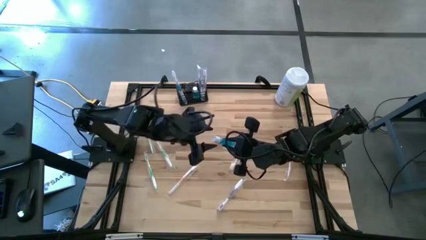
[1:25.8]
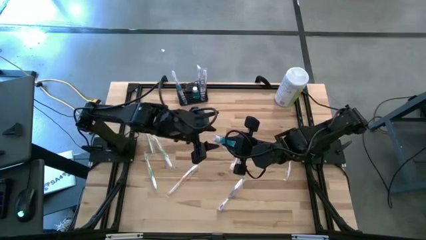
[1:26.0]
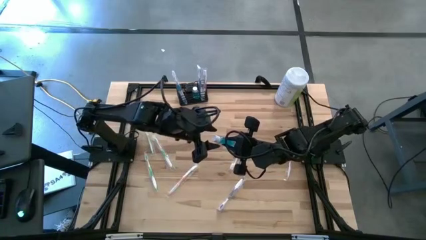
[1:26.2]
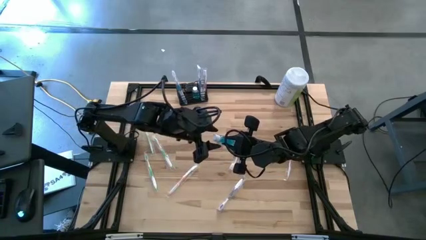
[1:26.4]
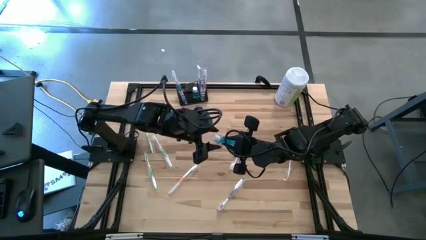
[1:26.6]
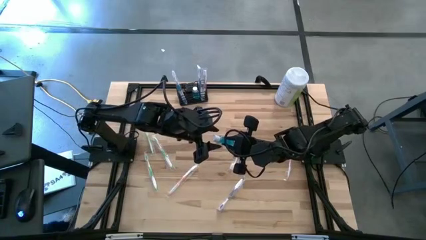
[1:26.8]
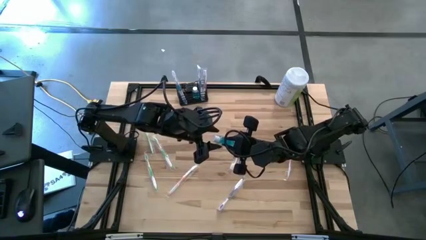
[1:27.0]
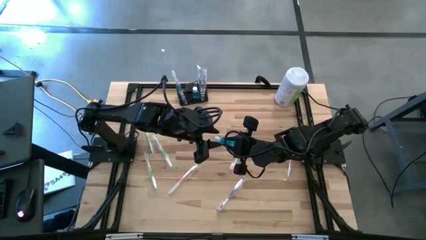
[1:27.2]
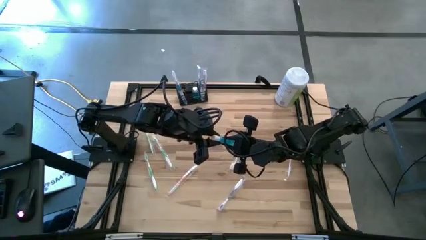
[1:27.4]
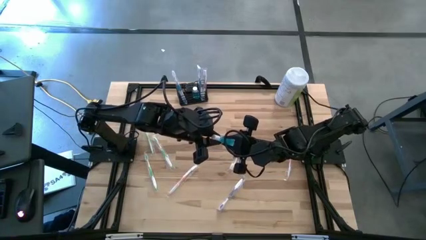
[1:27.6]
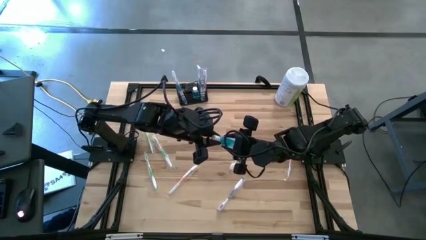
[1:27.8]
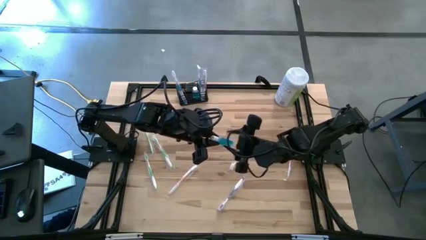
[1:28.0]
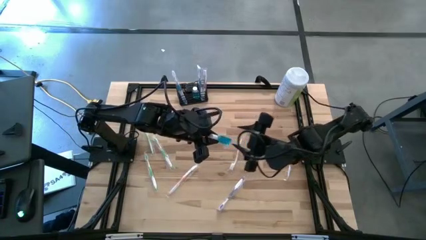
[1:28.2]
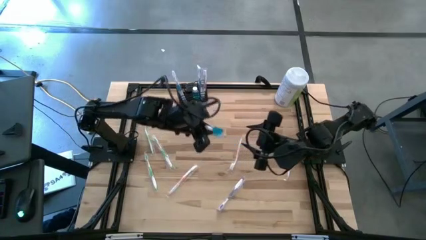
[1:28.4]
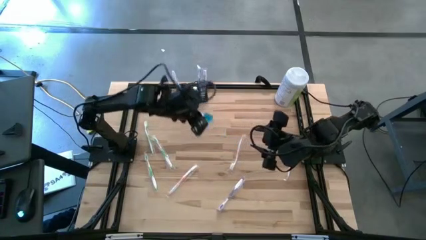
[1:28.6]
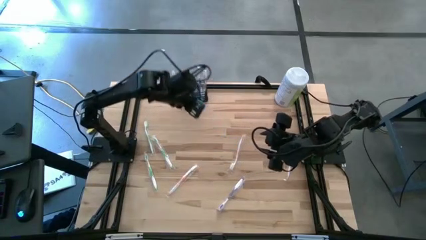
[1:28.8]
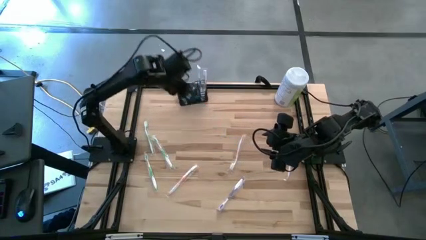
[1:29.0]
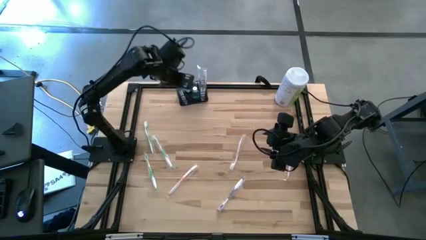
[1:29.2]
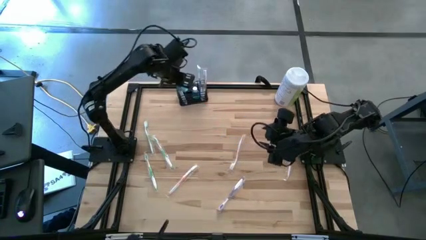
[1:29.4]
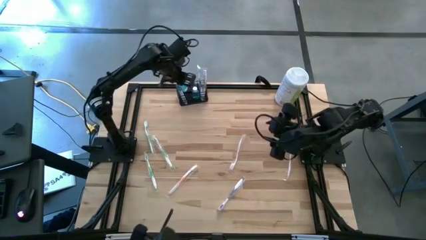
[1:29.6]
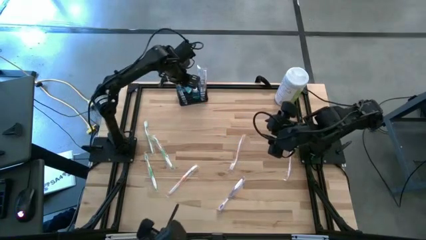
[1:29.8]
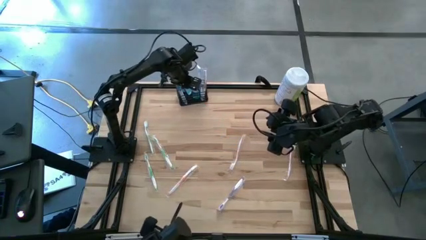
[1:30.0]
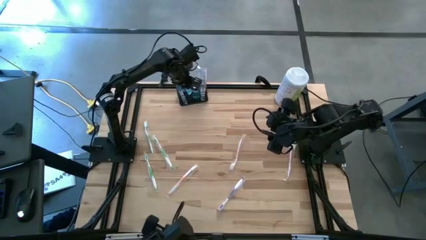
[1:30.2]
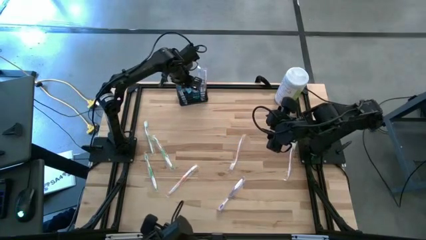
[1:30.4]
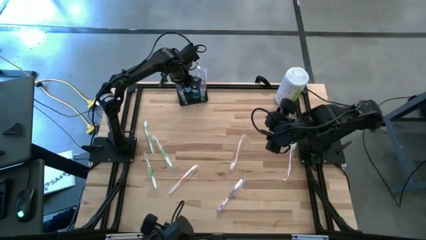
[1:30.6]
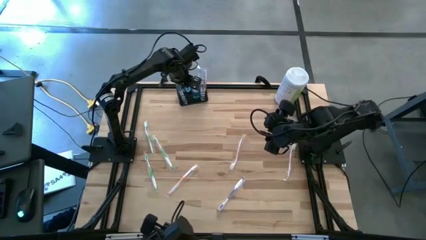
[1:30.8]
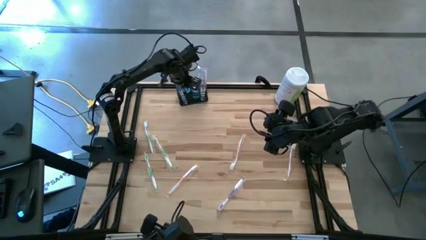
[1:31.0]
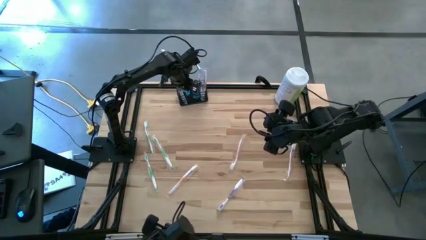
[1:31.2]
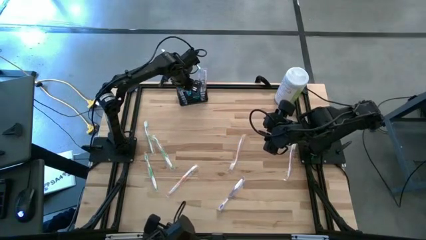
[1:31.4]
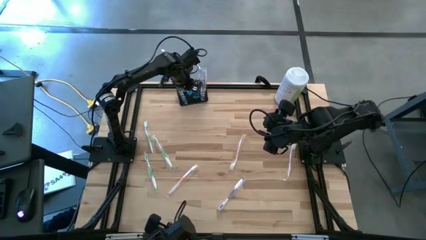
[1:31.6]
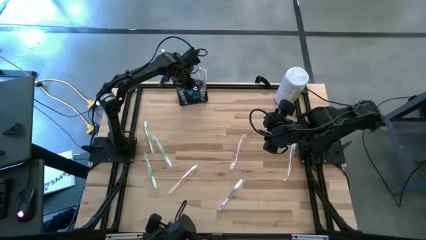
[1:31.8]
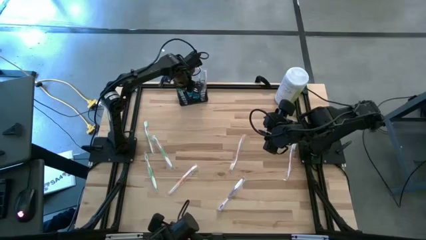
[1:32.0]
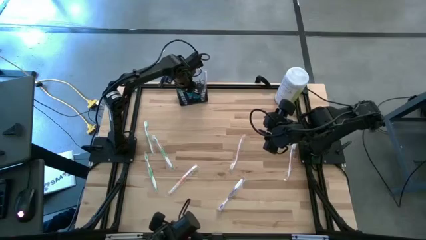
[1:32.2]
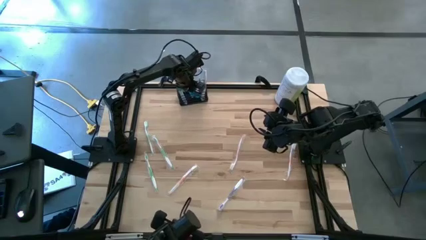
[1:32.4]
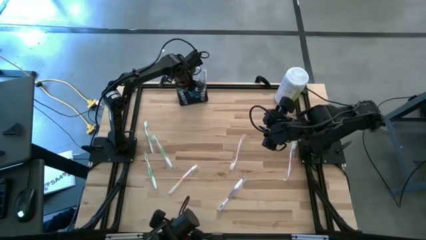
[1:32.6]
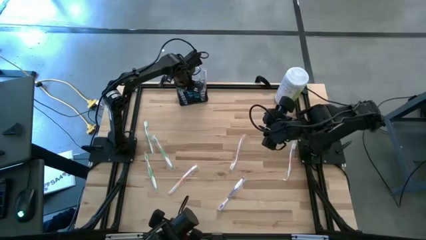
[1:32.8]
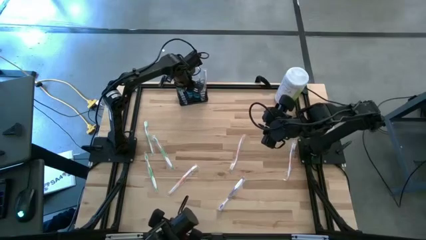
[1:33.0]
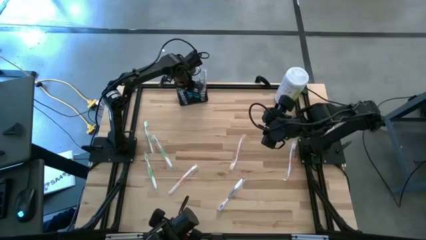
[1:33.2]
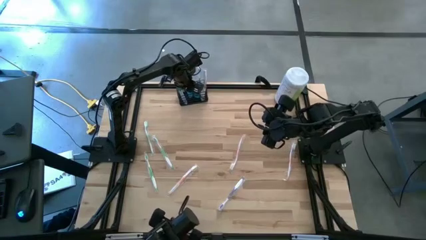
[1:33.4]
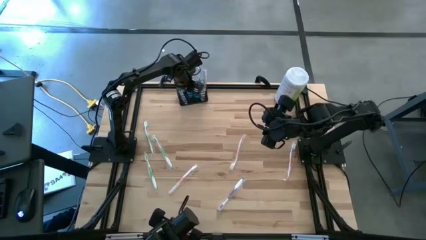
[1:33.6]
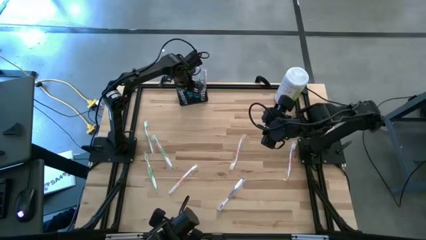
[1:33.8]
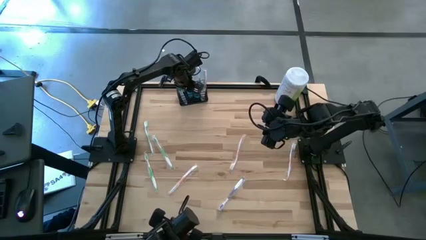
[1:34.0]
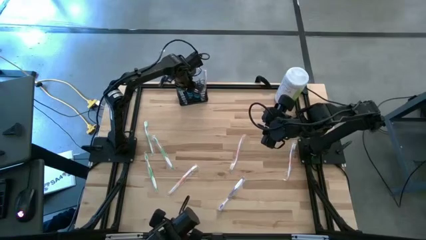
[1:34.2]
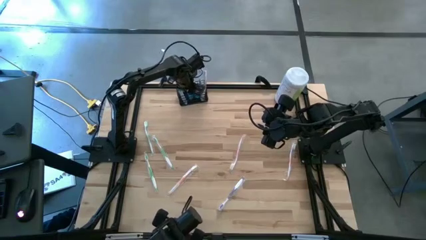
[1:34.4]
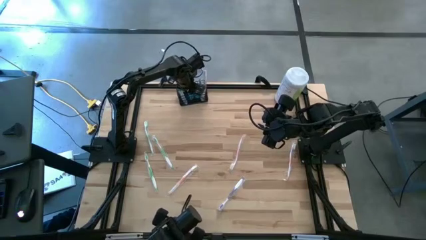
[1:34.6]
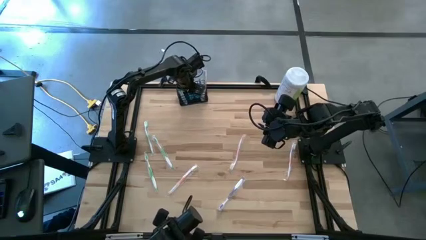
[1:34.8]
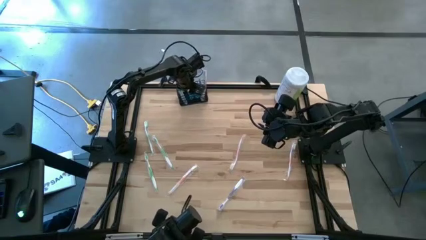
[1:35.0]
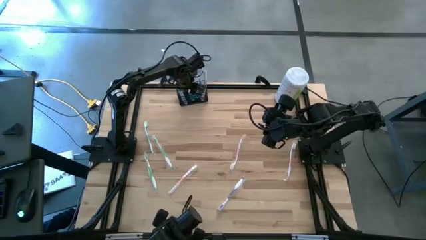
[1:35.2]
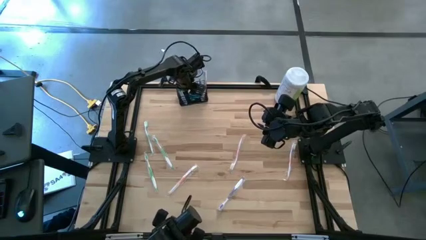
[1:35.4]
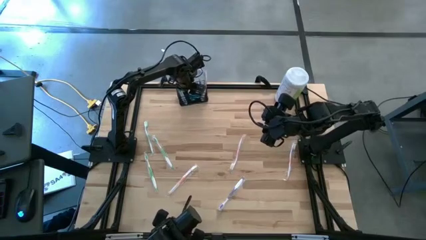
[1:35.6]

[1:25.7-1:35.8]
Task: Pick & Place toothbrushing station
Put the blue mouthwash into the black wire organizer

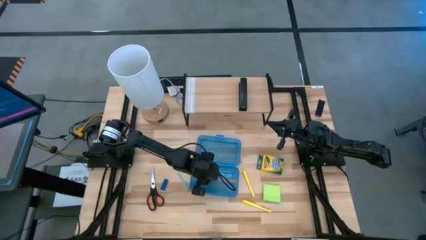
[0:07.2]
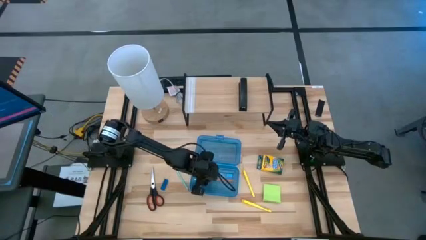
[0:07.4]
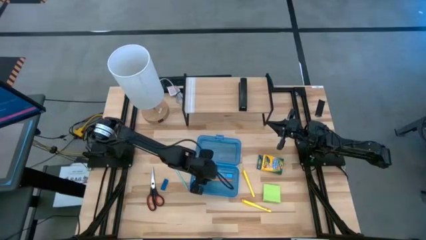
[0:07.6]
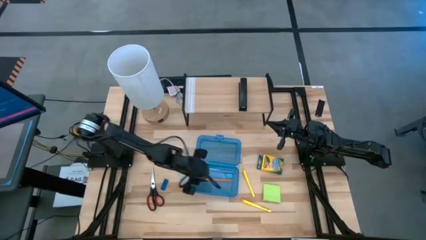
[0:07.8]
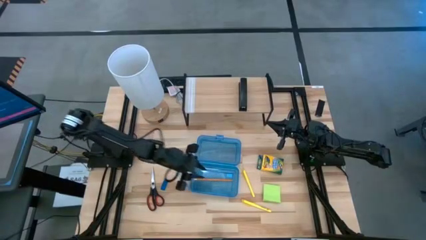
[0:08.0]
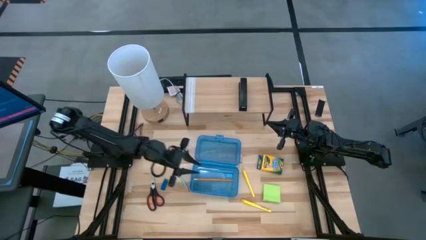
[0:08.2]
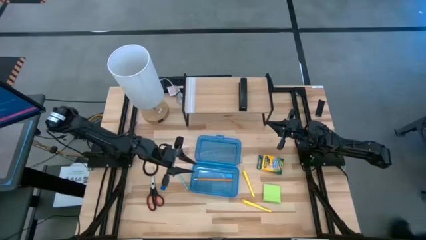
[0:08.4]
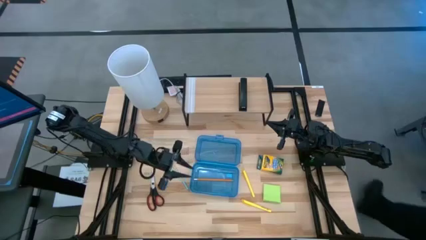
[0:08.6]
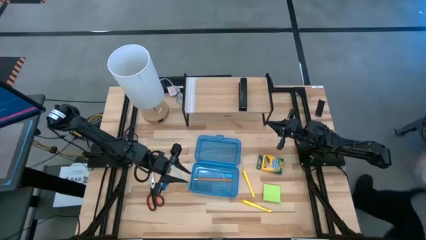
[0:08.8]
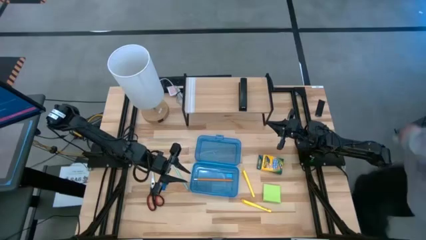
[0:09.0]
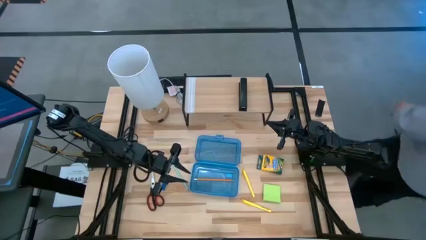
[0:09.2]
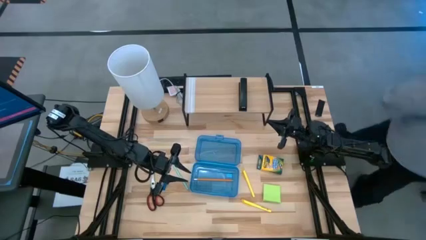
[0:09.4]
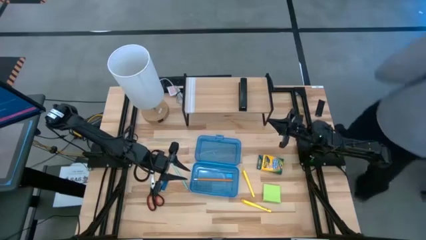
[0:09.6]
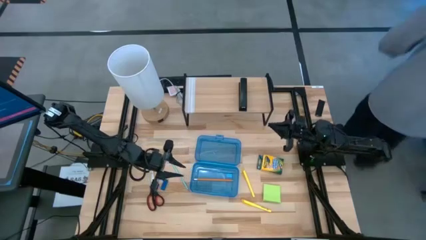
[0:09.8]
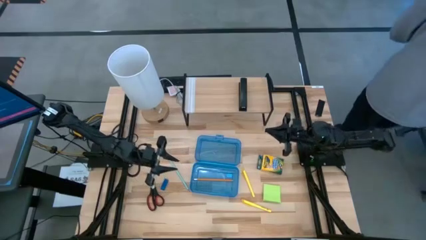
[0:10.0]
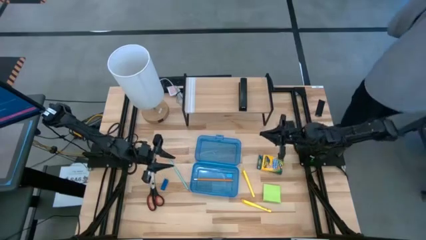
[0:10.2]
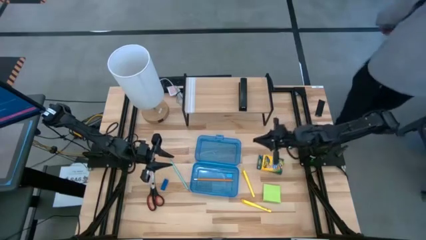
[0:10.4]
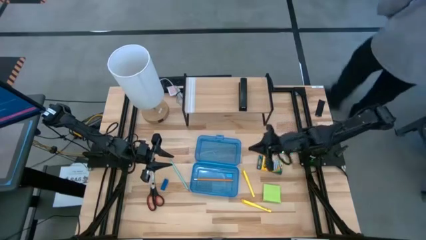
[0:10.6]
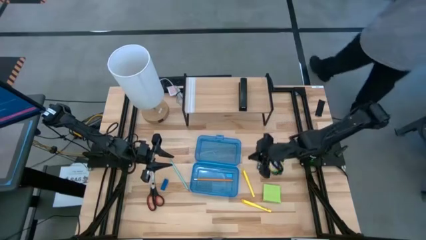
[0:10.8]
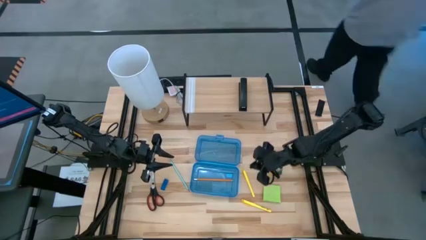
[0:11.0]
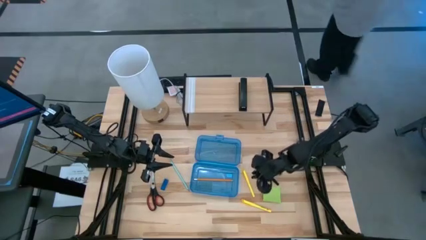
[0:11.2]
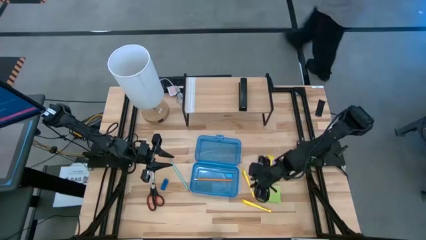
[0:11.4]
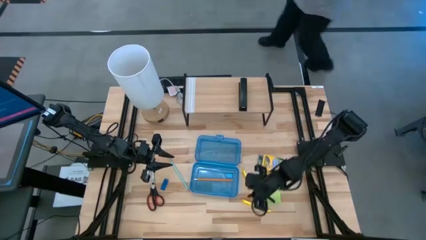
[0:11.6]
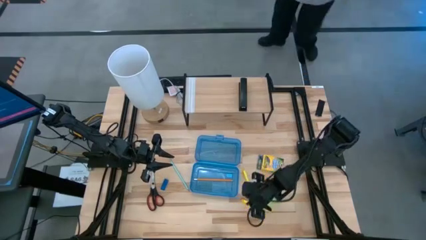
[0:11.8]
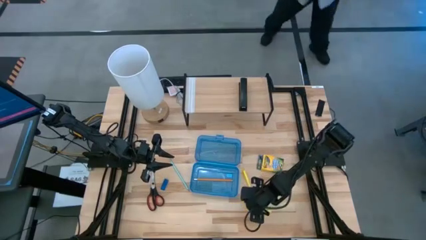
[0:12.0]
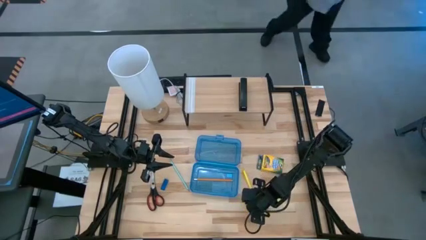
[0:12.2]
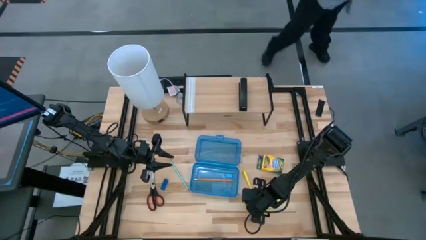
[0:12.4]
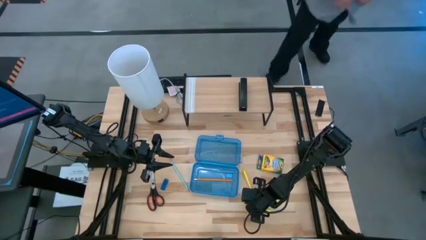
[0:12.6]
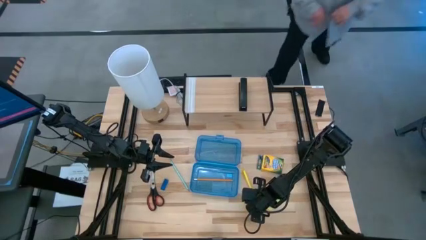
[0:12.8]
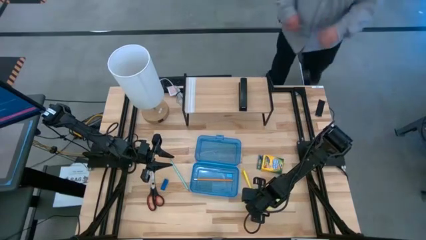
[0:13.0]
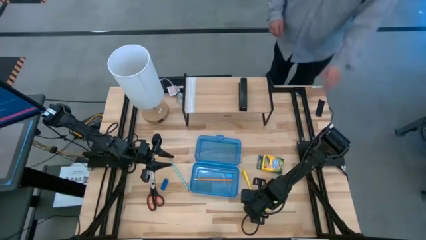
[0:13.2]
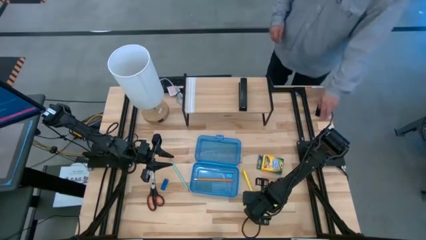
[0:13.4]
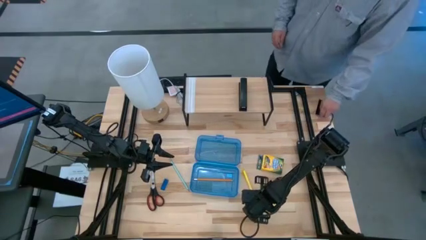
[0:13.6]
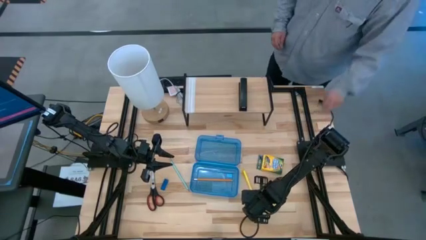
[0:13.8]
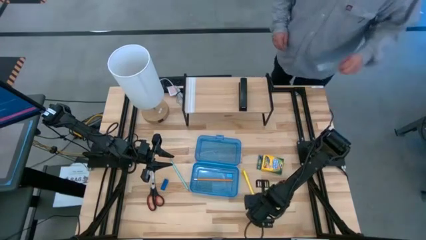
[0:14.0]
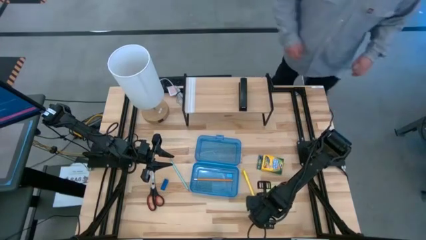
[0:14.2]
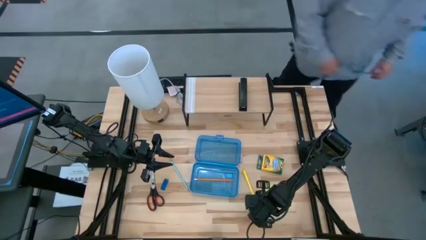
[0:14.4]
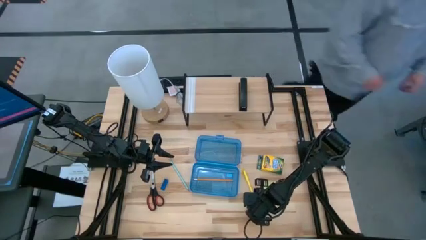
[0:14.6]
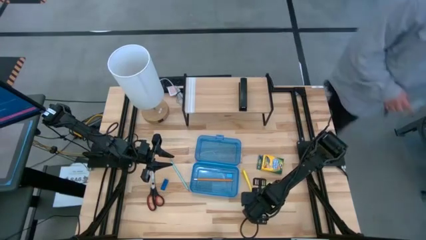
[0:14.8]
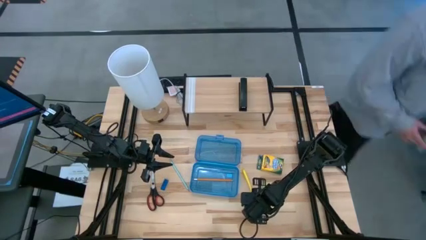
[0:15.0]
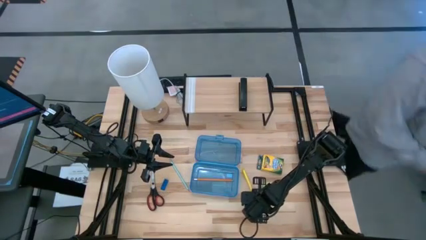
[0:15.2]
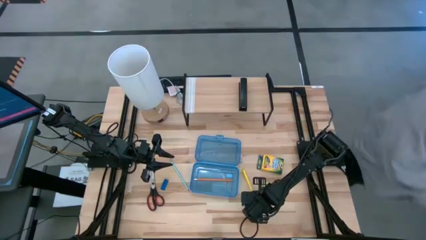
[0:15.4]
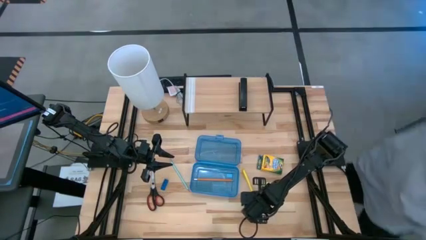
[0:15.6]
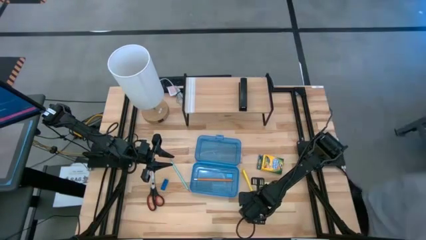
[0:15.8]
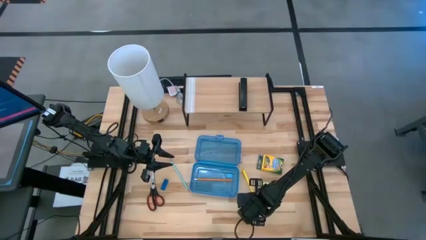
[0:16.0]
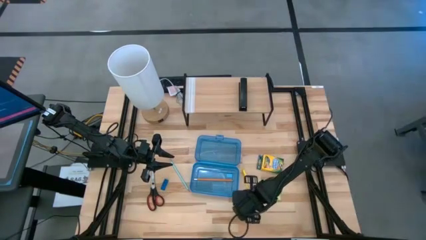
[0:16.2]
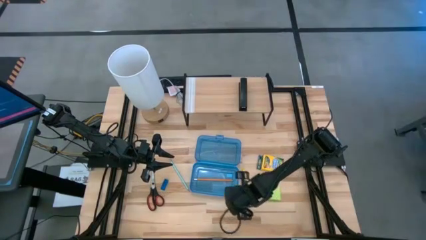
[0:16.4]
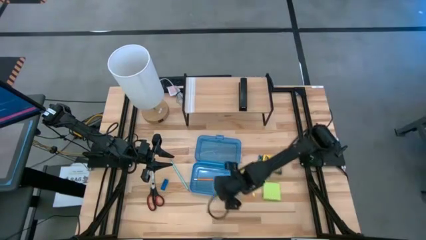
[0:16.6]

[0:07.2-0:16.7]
Task: Pack school essentials
Put the bottom yellow pen into the blue supply box
